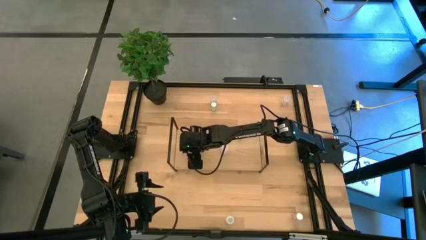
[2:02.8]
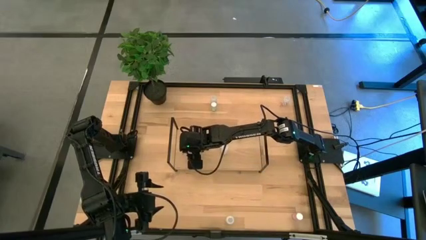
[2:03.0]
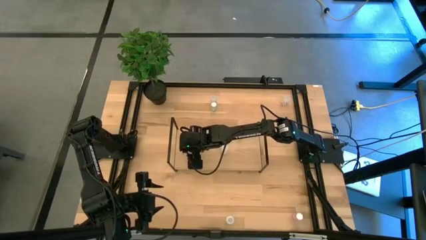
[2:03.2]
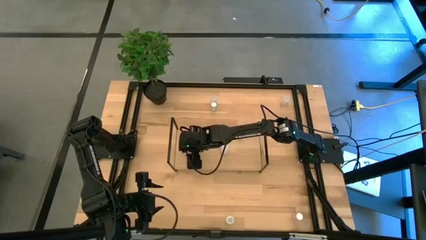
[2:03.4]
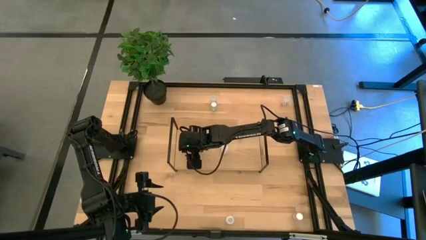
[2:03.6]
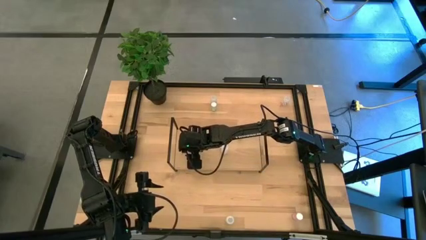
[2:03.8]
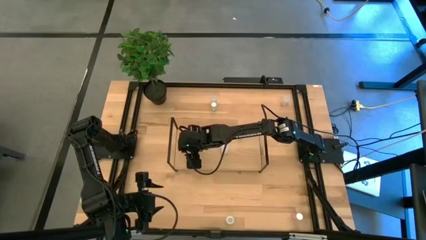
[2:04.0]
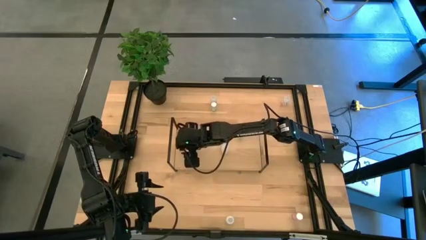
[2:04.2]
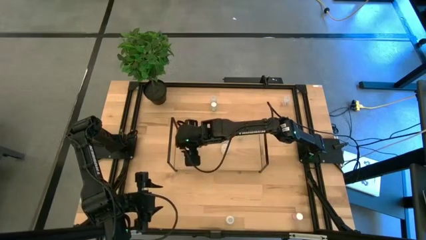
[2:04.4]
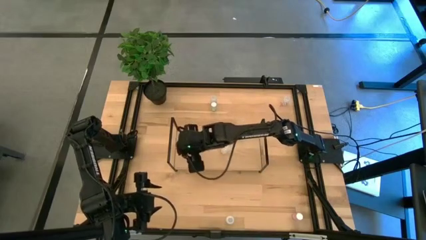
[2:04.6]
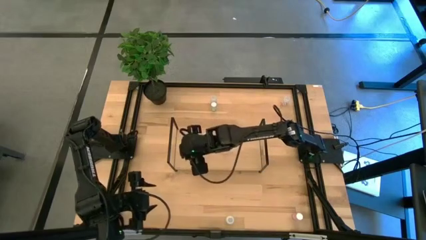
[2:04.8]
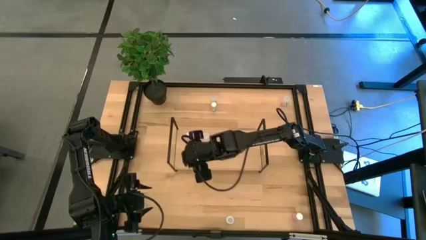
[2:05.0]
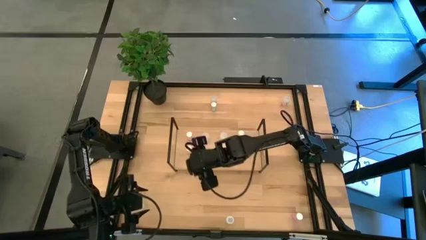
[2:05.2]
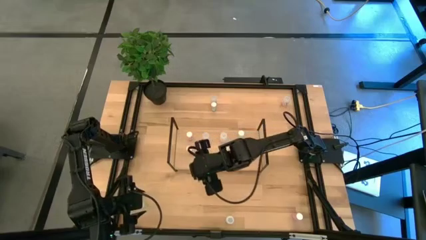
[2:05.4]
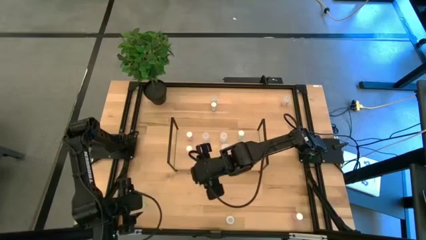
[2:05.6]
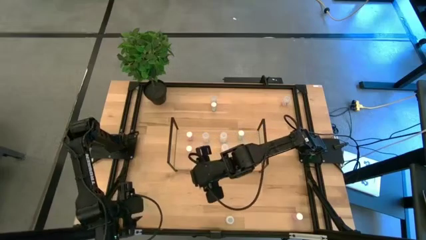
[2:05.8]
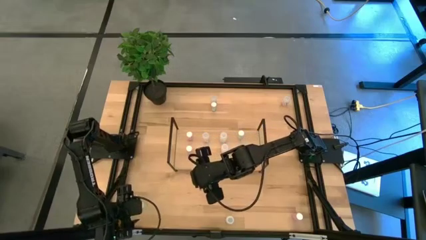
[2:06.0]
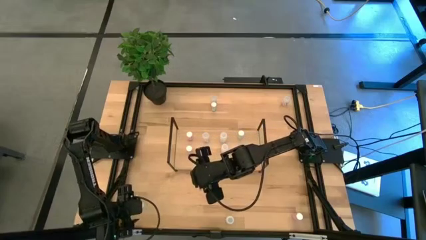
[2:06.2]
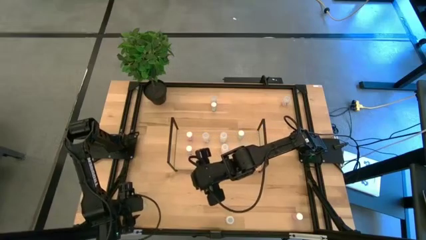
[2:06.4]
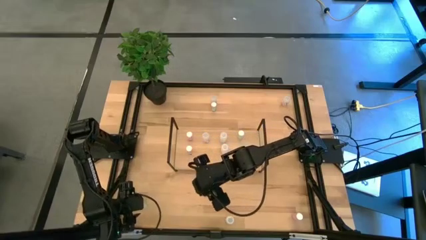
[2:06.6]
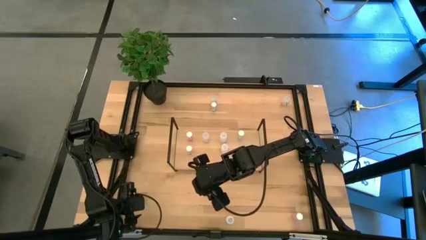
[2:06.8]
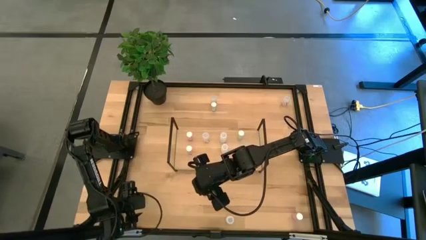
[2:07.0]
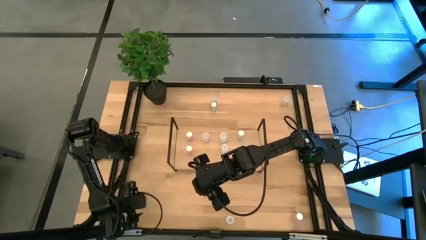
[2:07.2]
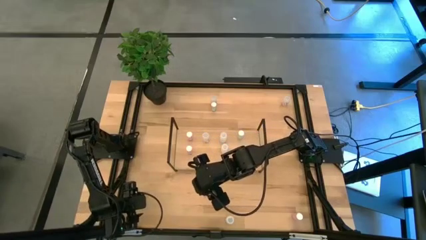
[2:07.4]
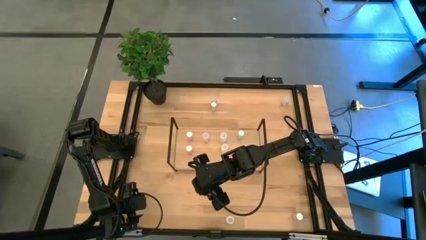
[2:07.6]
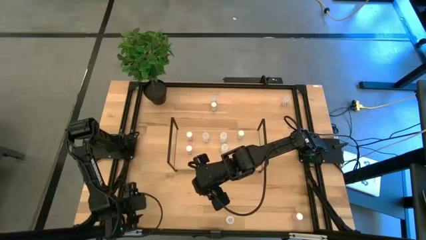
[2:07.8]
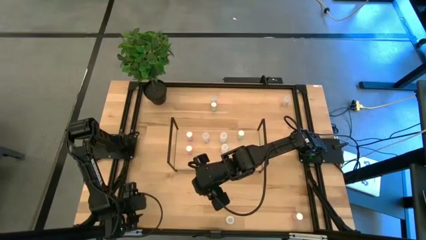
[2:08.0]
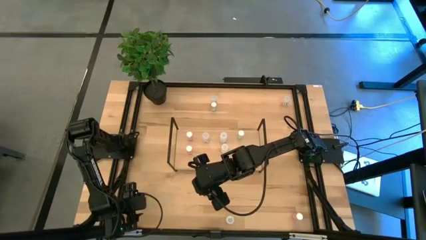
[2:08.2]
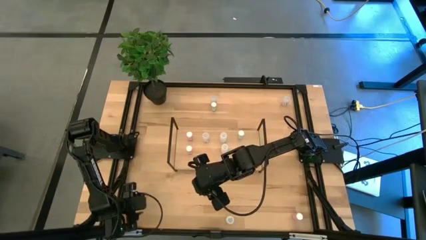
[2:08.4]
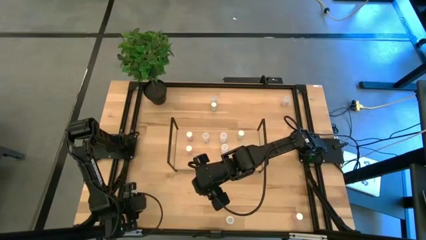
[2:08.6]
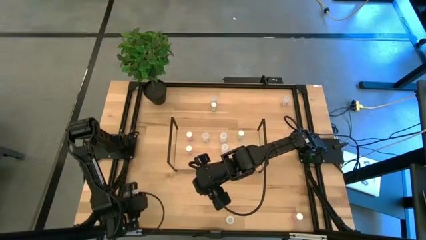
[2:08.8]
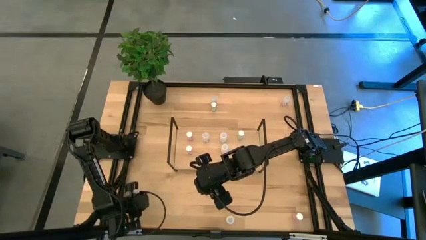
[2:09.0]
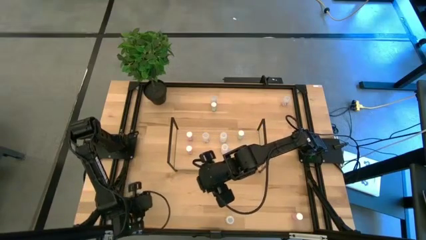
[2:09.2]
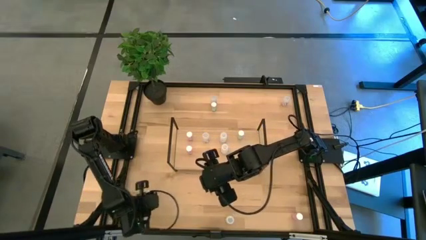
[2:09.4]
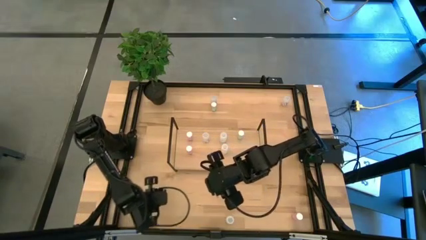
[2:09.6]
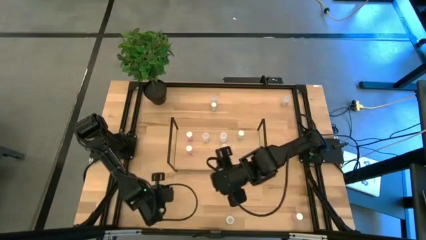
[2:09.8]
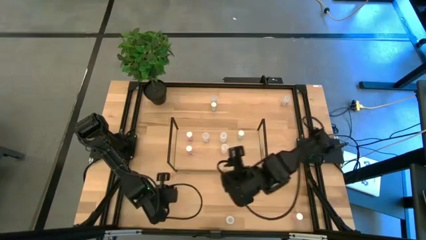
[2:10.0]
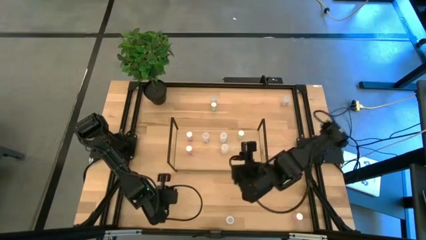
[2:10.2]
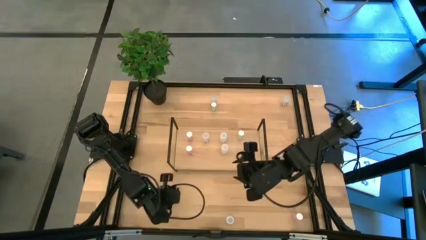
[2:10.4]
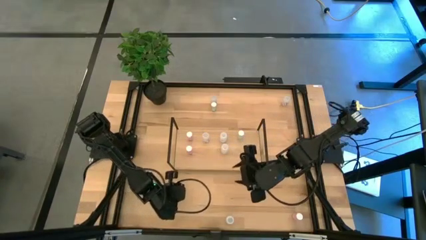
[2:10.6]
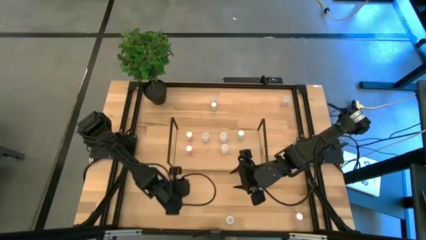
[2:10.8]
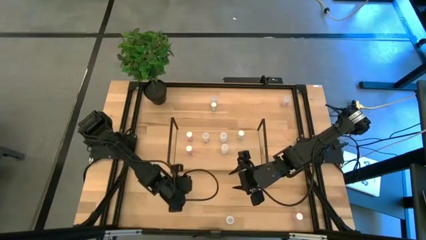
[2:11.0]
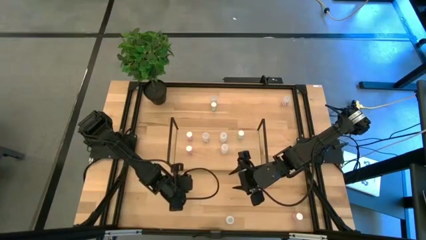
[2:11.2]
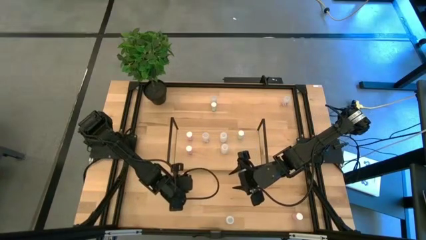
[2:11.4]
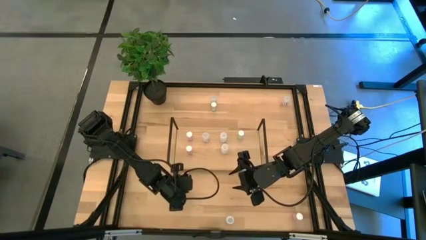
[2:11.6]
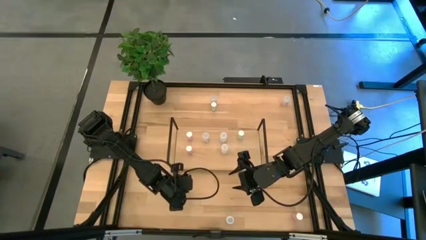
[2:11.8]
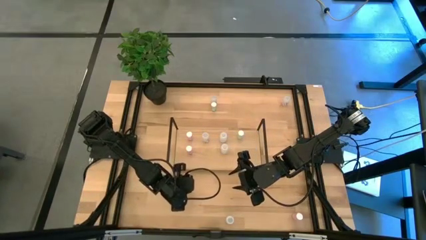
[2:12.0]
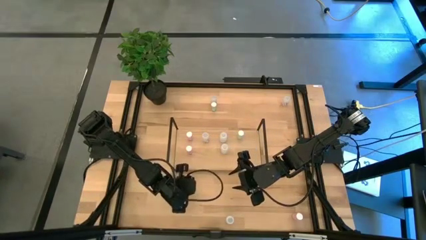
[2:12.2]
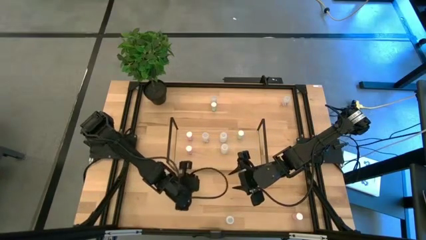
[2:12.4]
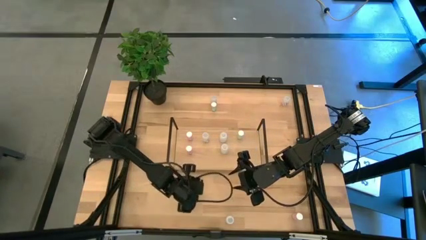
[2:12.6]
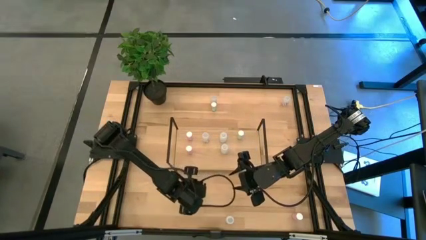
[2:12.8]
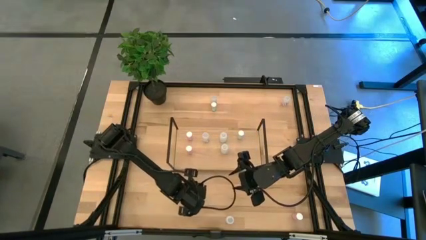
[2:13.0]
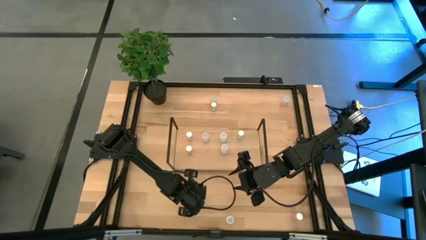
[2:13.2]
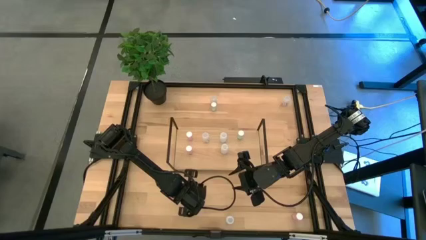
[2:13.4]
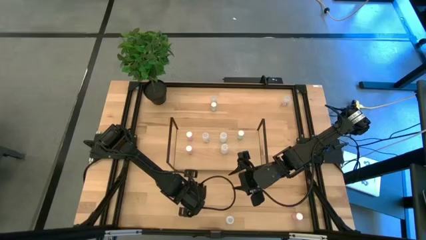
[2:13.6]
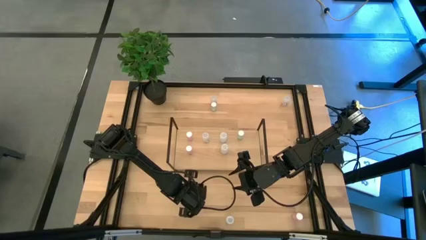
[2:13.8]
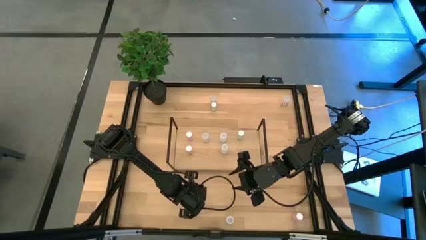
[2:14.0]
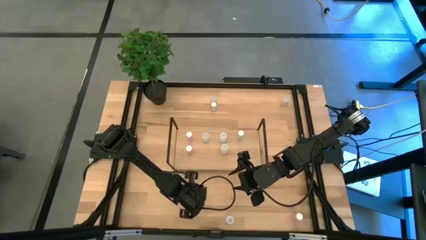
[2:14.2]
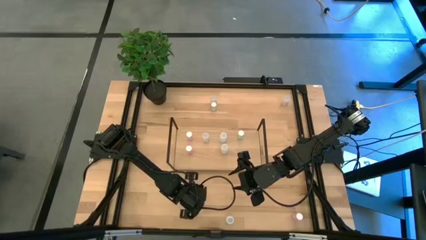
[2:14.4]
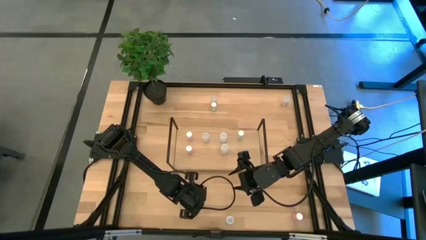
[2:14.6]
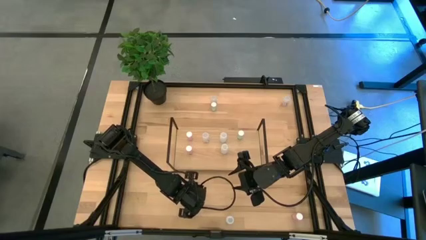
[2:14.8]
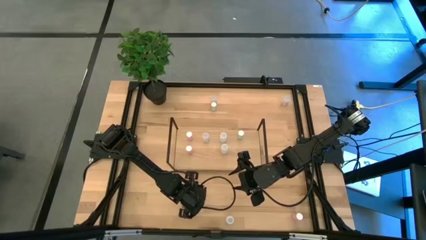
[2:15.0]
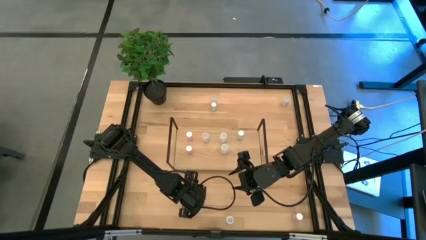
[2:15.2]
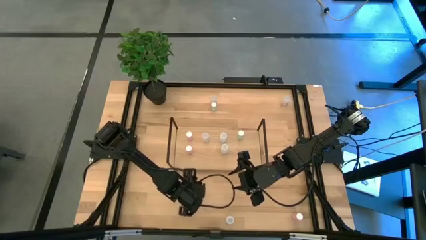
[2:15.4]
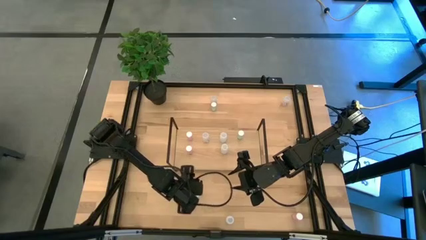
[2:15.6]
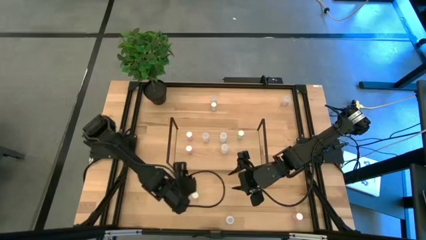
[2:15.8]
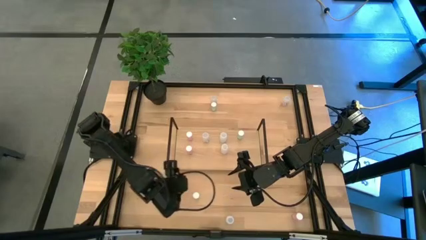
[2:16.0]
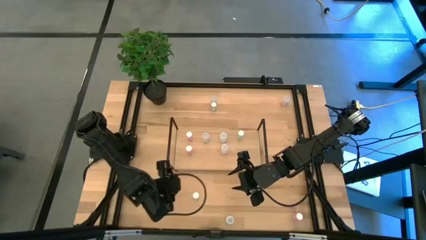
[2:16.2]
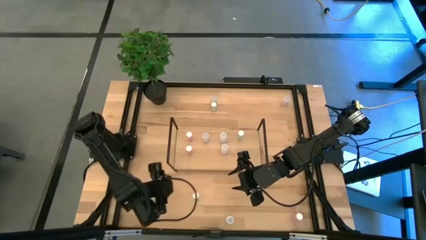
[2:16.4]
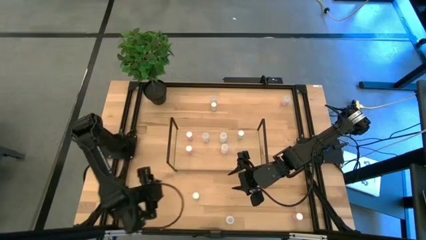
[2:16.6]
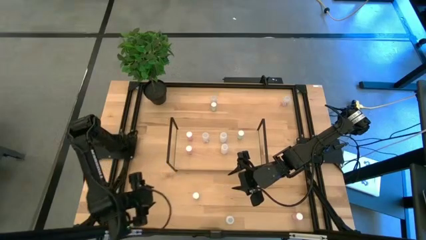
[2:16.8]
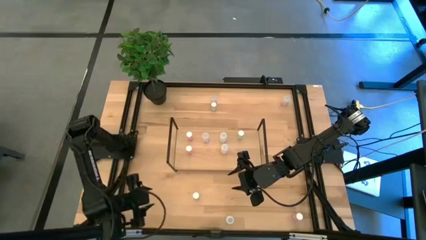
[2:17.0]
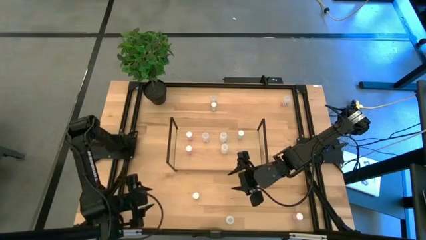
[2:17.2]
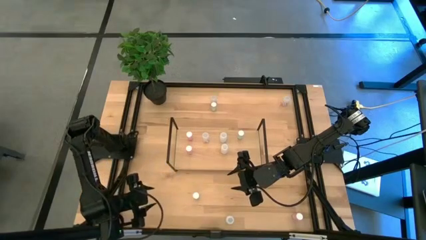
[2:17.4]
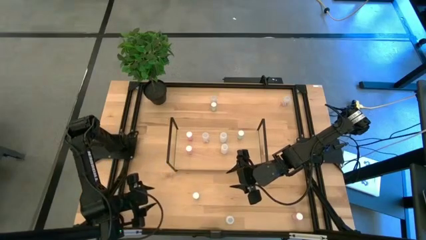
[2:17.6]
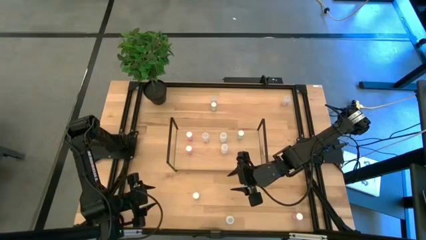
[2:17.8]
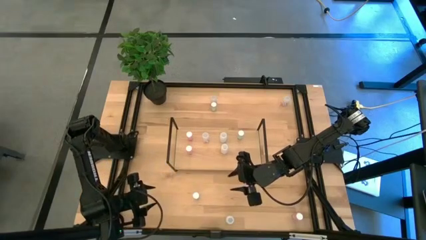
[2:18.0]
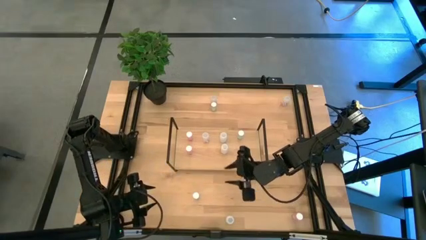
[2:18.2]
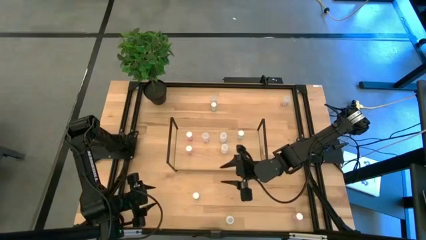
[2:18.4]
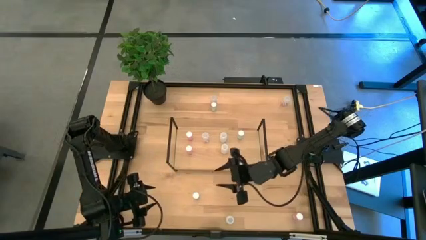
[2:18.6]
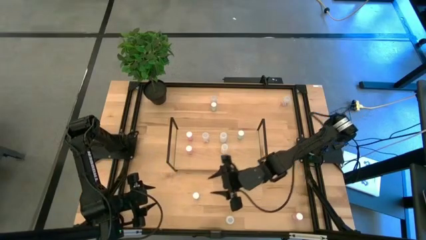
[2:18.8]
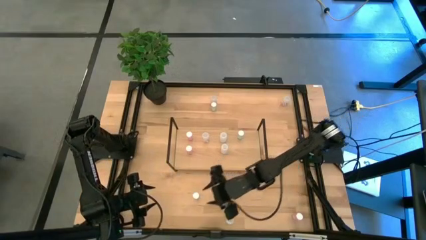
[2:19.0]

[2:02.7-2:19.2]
Task: Pick and place medicine bottles onto shelf by color
Put the bottom blue pill bottle on the shelf aligned with the other blue pill bottles
